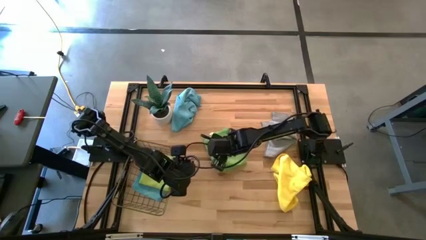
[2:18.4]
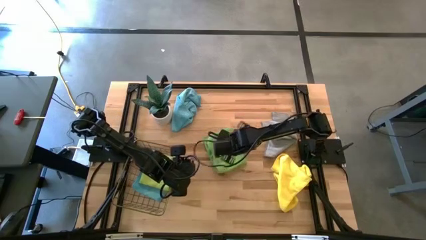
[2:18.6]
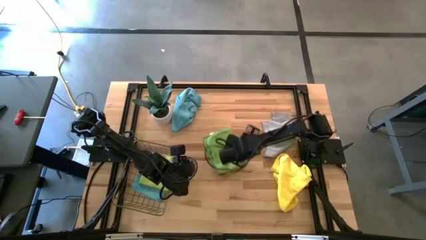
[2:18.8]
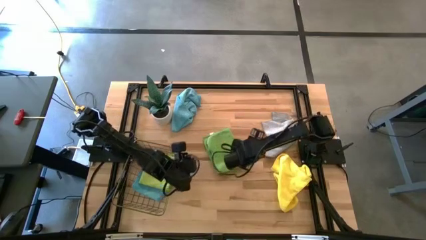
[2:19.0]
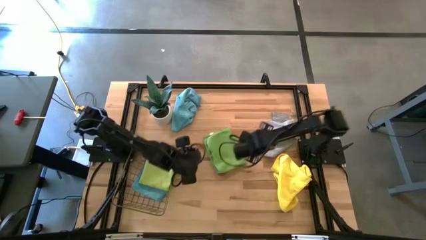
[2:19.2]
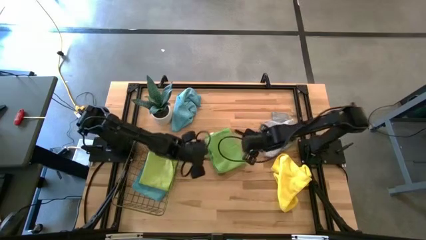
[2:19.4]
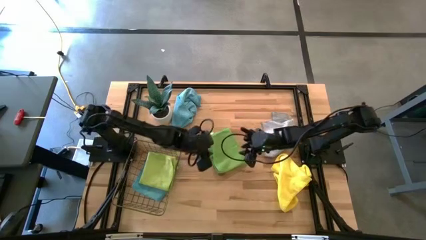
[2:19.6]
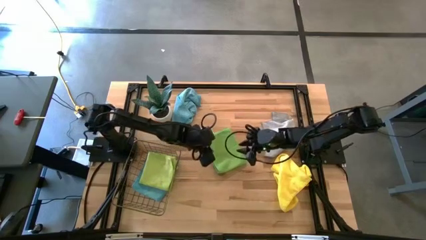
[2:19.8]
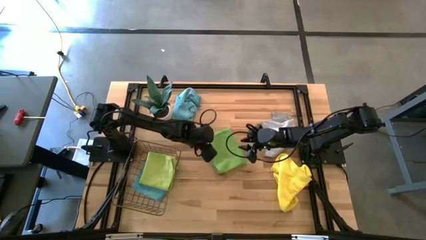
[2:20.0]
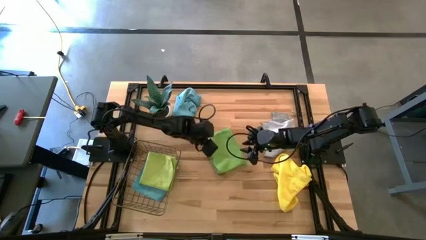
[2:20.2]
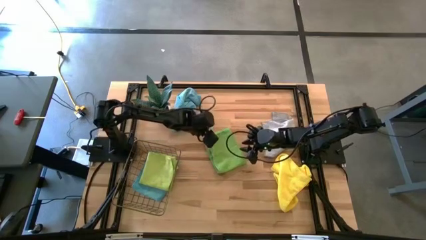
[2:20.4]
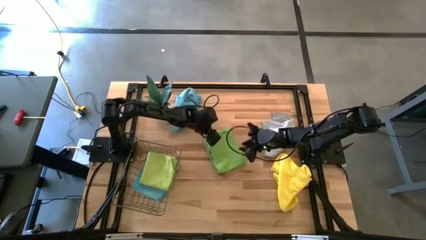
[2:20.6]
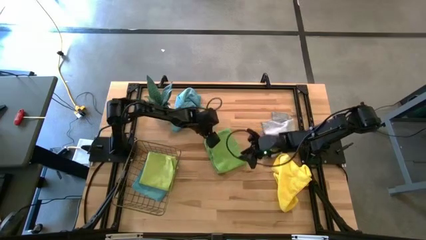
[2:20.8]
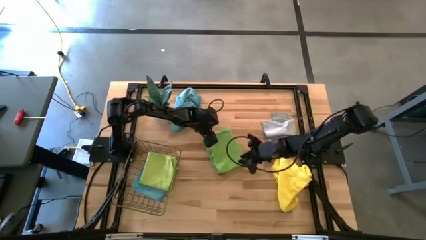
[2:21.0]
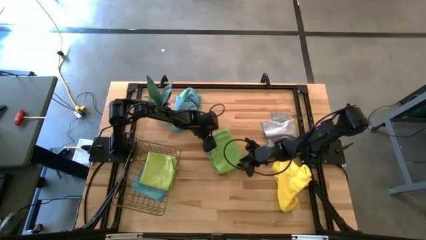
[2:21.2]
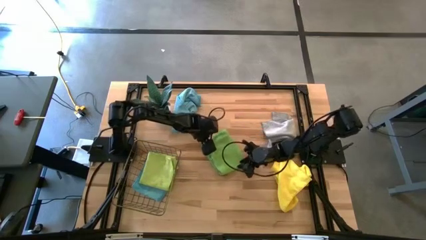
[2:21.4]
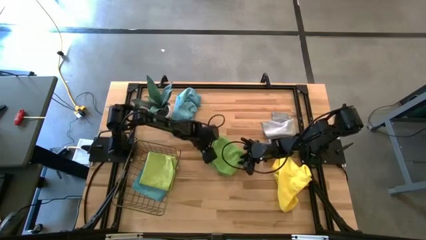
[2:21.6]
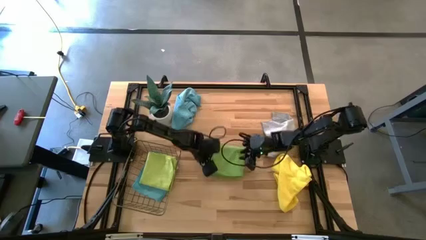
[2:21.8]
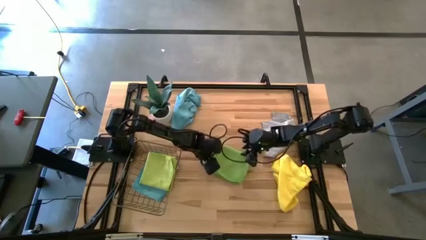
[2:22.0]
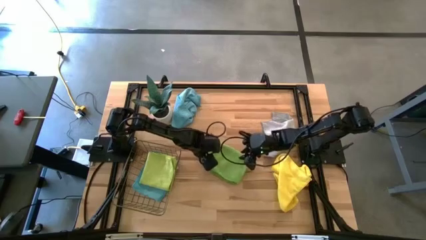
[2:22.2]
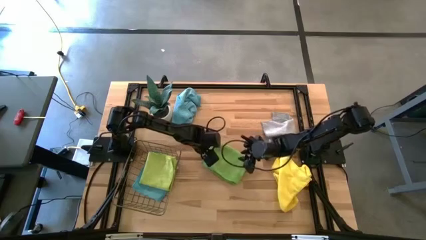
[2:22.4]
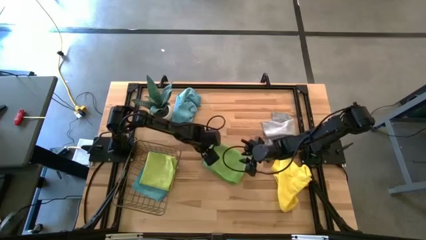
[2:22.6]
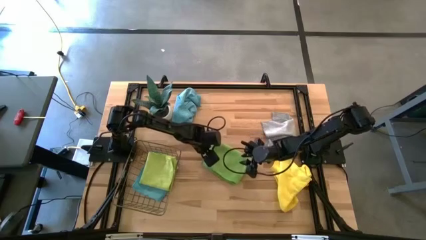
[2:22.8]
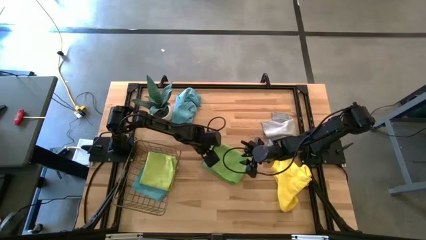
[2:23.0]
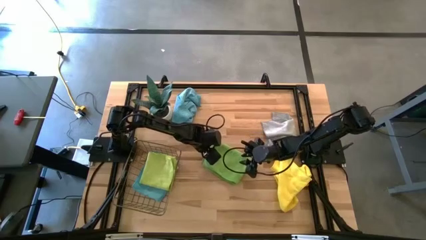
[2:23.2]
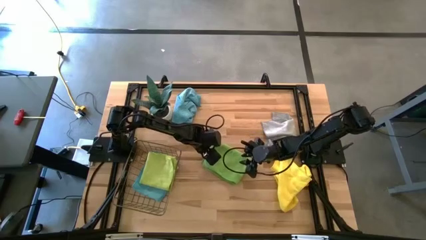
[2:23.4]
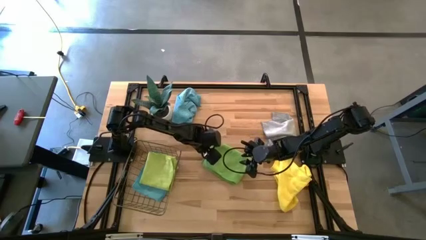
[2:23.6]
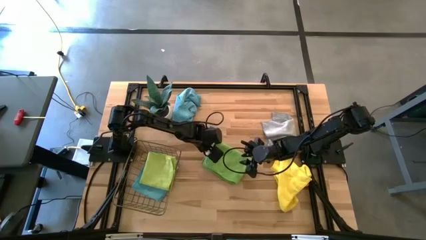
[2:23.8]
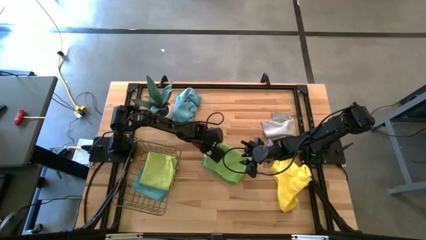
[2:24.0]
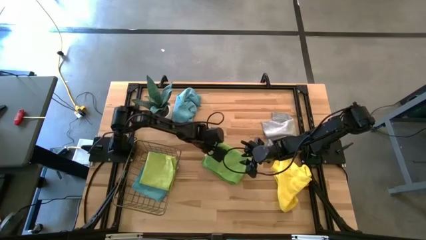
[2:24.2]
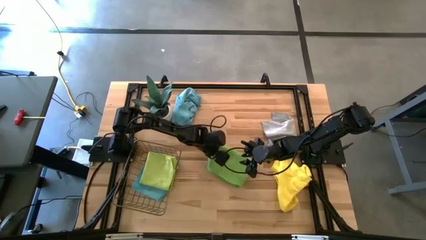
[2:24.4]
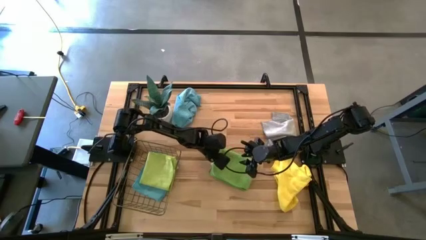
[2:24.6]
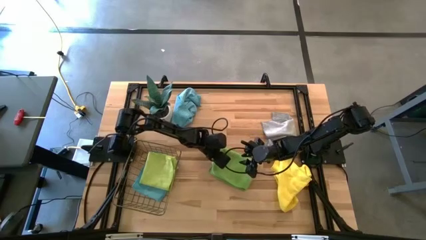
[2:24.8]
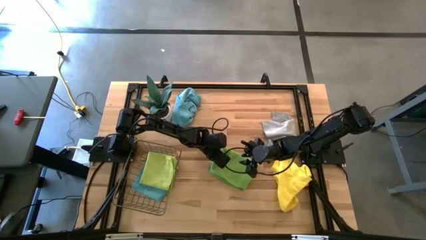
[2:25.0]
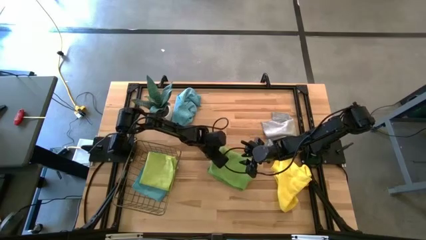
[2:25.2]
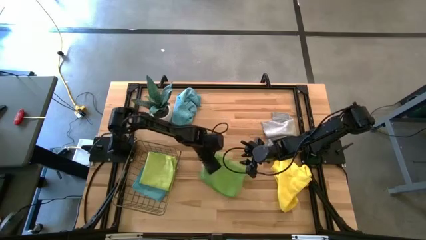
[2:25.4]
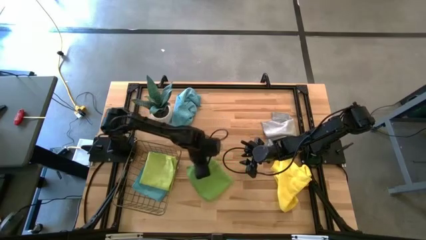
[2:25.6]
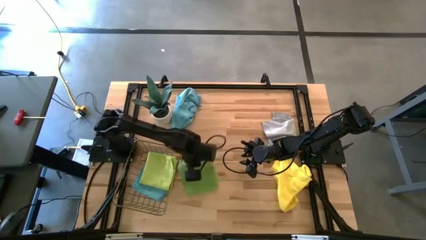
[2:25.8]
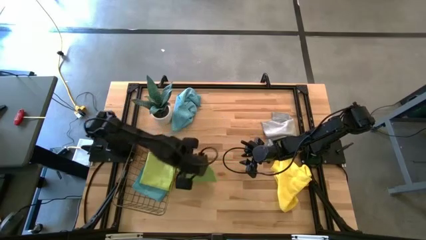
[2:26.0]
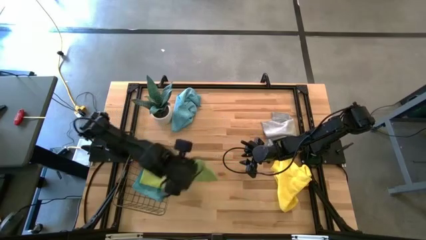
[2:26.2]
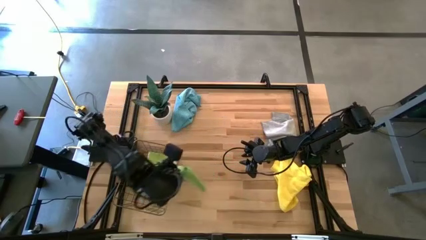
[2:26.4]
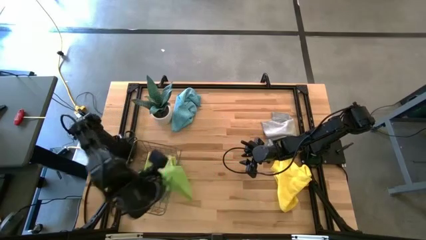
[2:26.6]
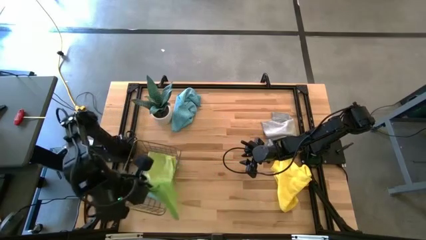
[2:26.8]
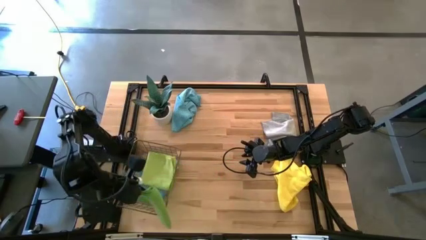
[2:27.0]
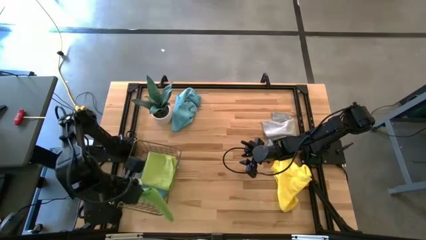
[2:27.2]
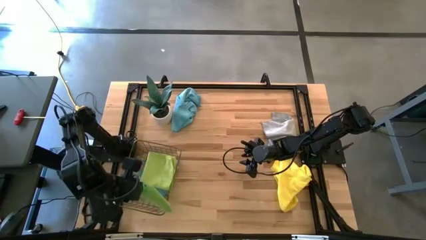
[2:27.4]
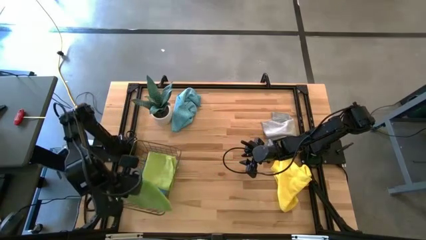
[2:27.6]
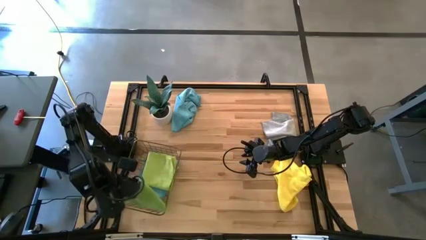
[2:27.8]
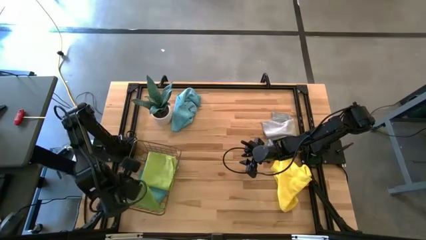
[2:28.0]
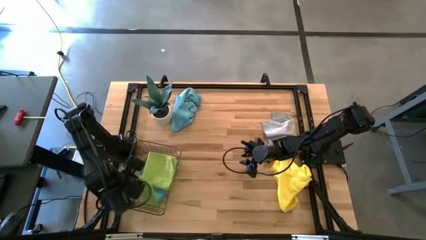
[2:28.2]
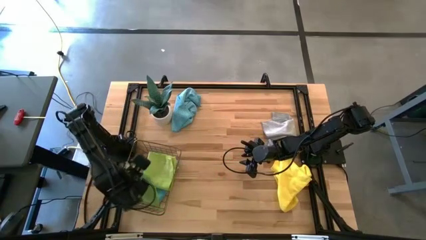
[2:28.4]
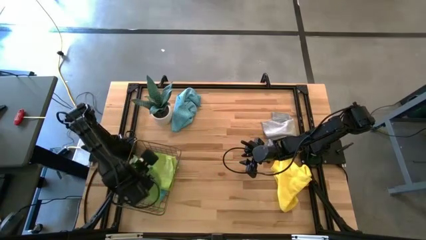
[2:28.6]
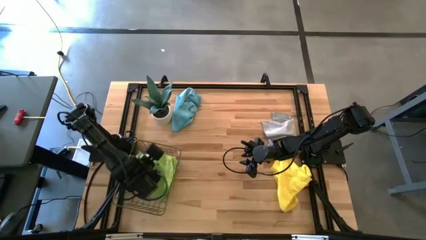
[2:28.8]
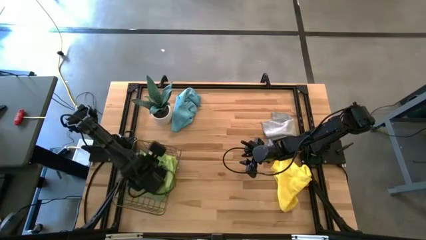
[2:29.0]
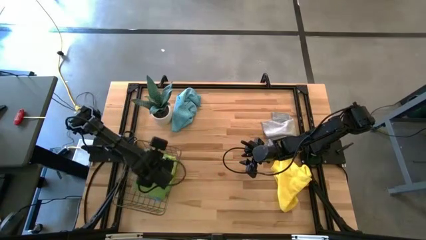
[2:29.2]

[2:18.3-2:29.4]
Task: Fold microfiber towels
Put the green microfiber towel into the wire basket

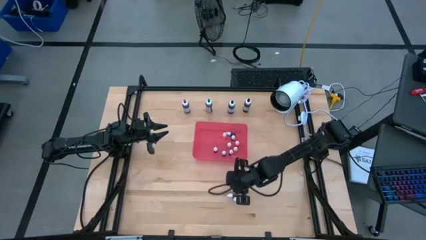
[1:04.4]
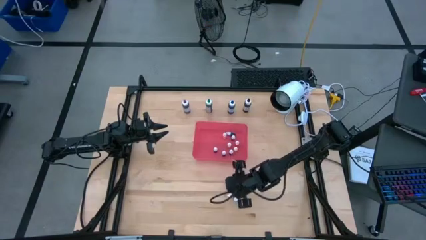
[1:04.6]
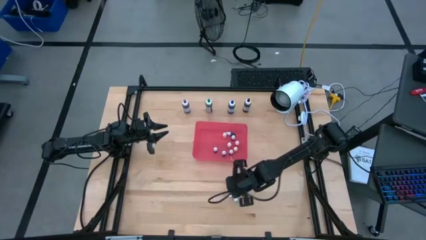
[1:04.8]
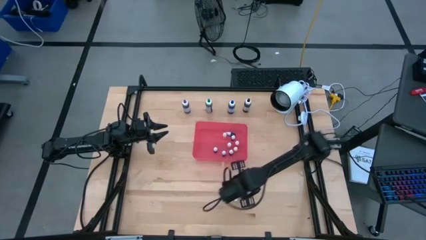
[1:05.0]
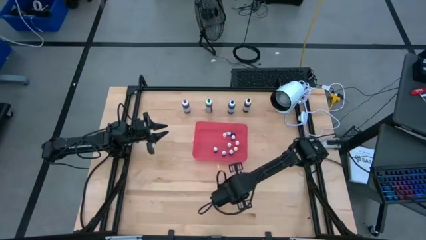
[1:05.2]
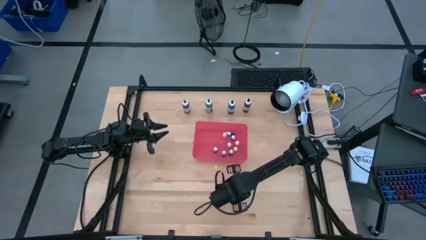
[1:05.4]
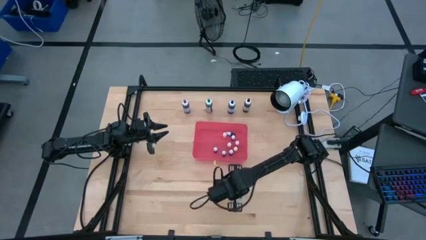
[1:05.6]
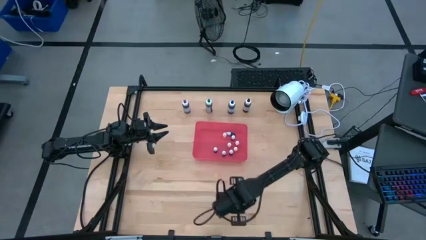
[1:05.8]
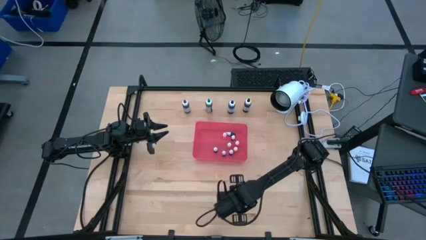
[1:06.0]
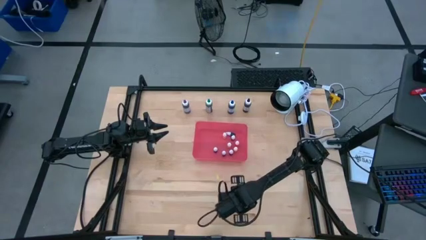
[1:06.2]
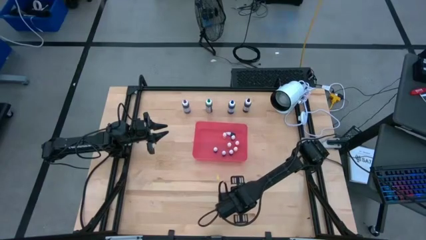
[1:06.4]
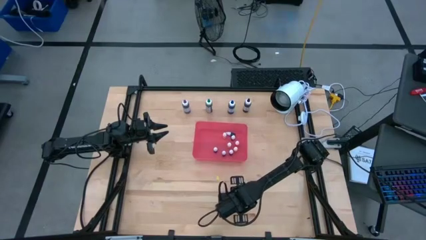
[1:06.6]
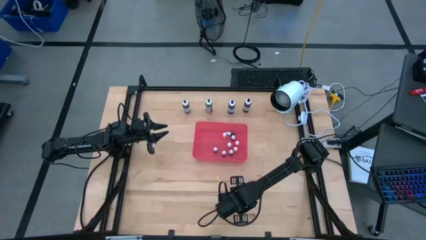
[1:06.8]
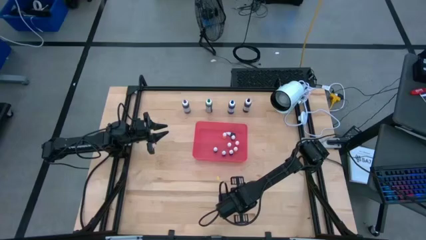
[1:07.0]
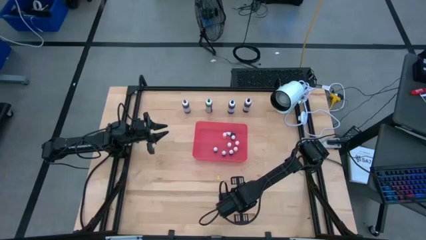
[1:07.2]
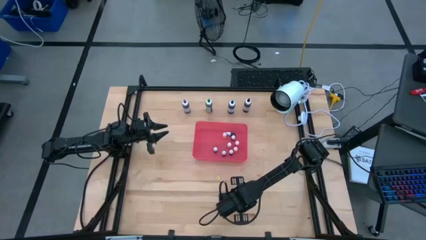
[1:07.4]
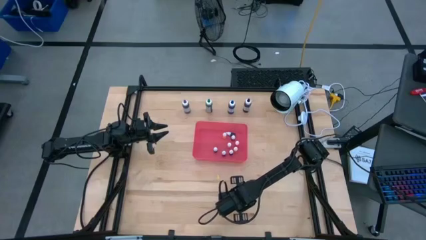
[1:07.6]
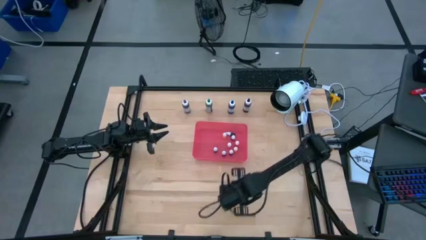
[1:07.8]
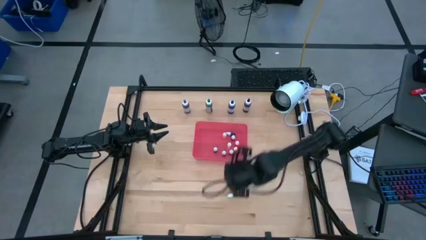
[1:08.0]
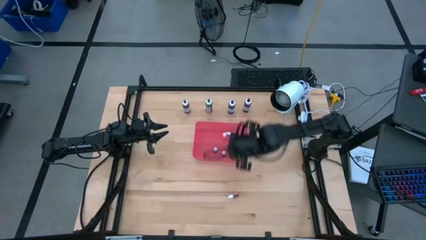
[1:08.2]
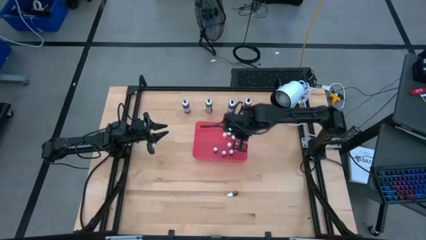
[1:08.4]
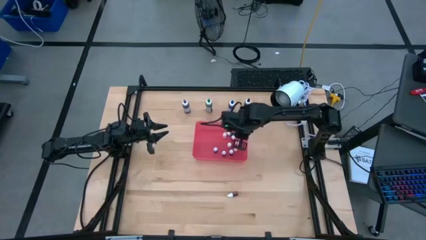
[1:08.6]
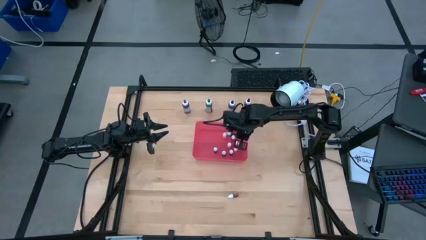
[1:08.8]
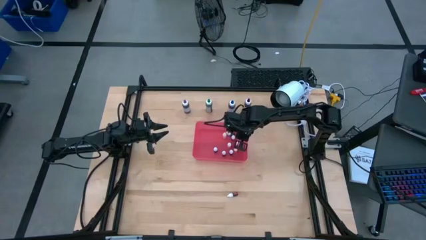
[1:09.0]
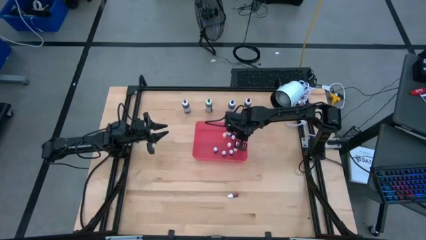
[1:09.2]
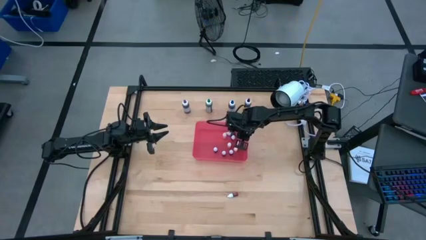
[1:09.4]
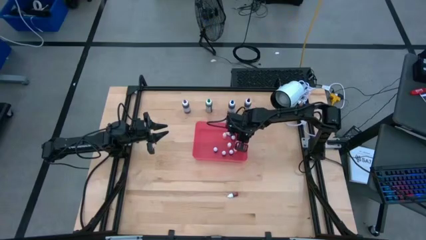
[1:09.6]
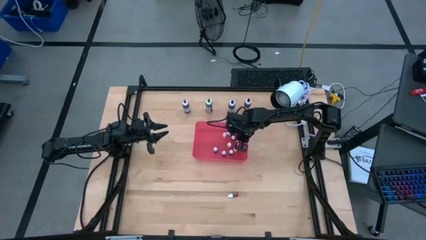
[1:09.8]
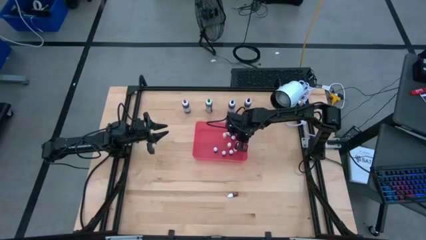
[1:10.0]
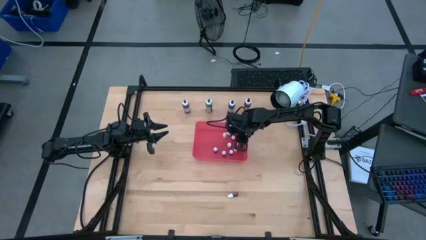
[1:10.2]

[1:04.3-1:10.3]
Task: Pick & Place food coloring
Put the small purple food coloring bottle into the red bin
